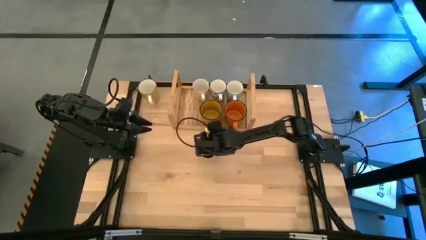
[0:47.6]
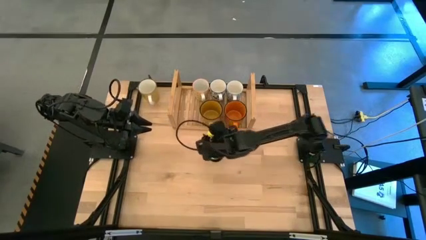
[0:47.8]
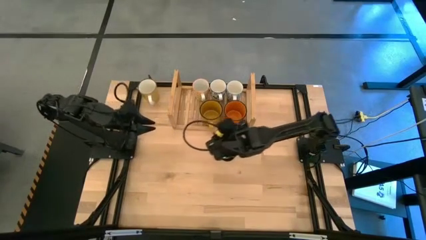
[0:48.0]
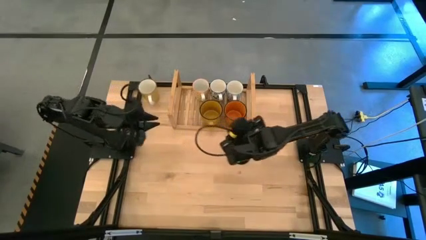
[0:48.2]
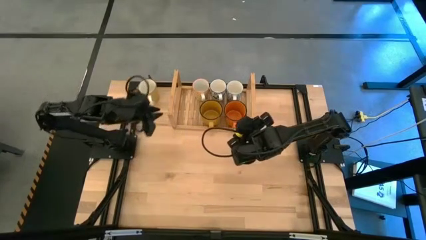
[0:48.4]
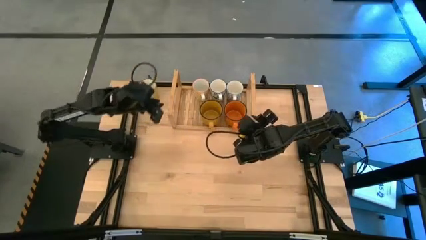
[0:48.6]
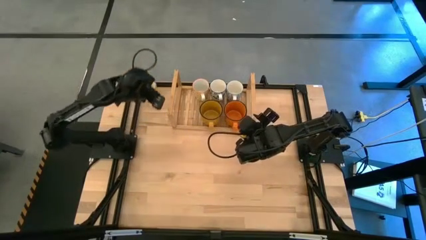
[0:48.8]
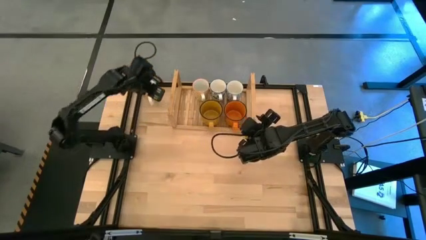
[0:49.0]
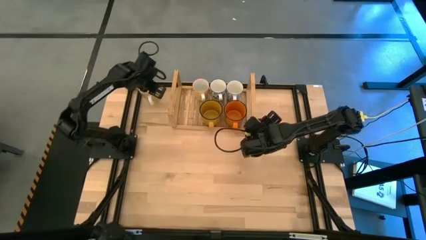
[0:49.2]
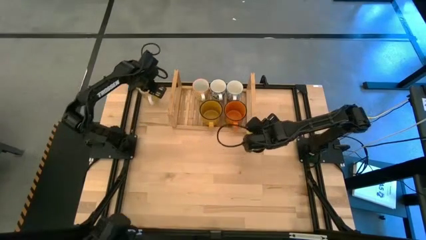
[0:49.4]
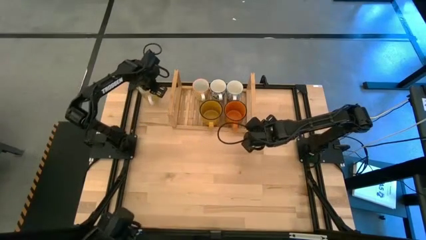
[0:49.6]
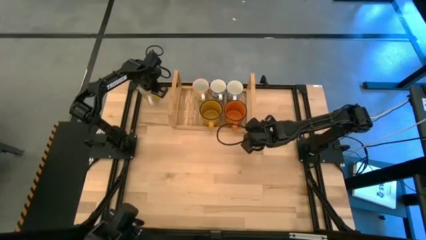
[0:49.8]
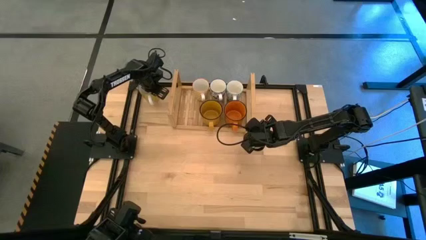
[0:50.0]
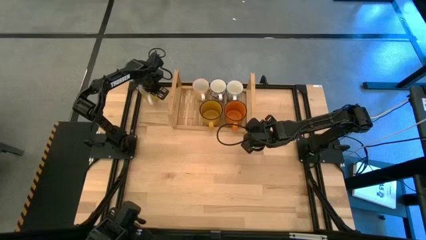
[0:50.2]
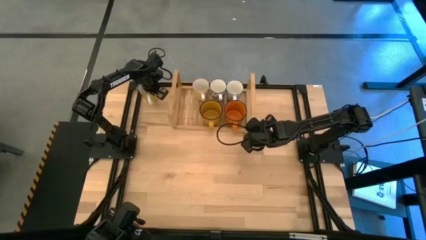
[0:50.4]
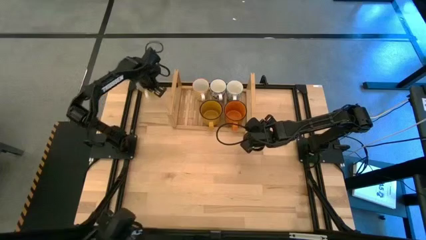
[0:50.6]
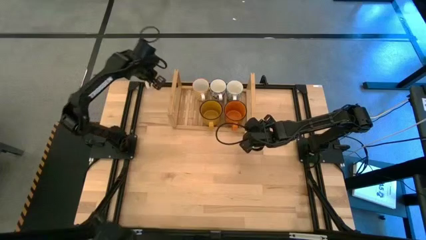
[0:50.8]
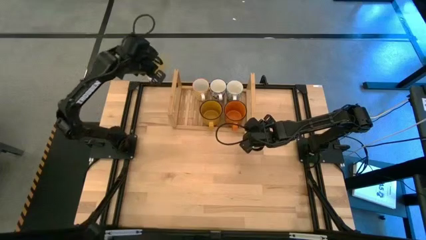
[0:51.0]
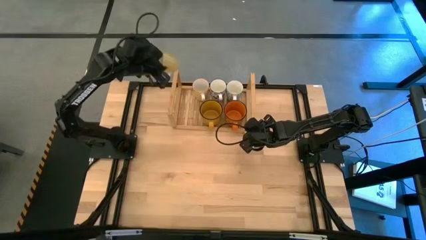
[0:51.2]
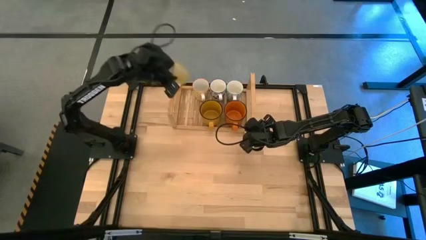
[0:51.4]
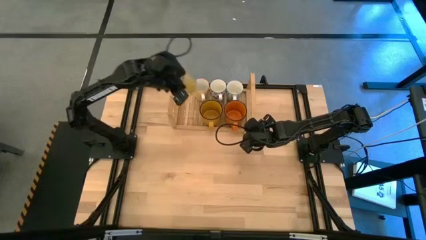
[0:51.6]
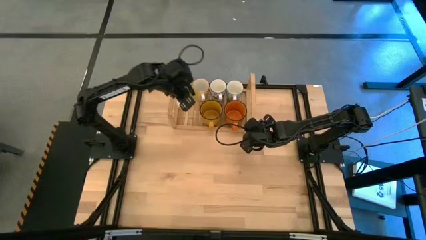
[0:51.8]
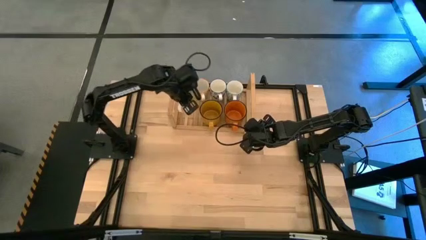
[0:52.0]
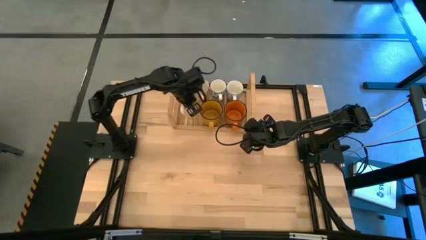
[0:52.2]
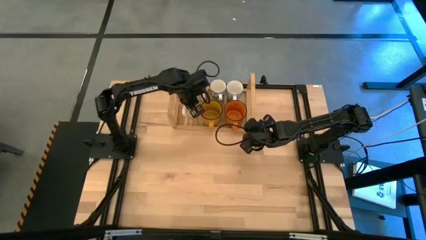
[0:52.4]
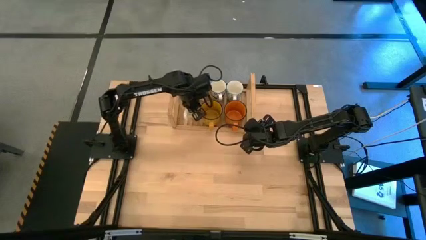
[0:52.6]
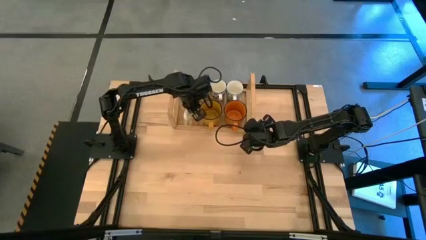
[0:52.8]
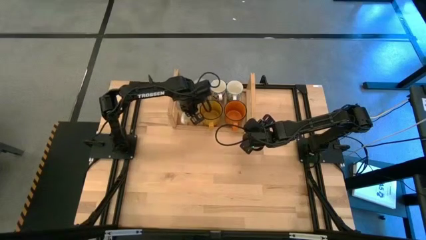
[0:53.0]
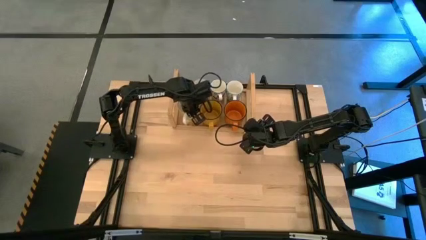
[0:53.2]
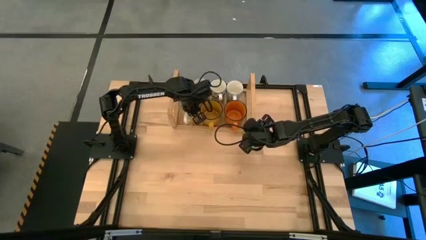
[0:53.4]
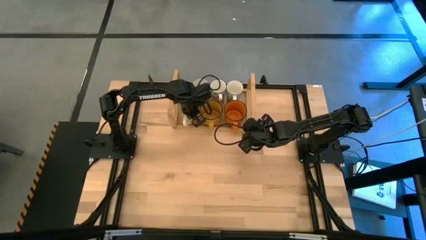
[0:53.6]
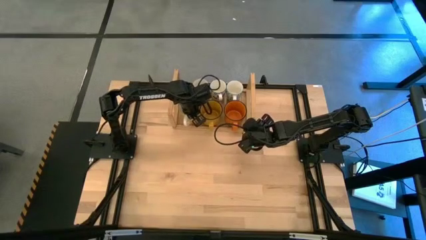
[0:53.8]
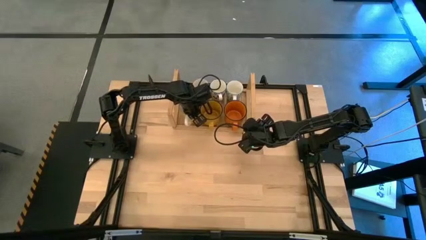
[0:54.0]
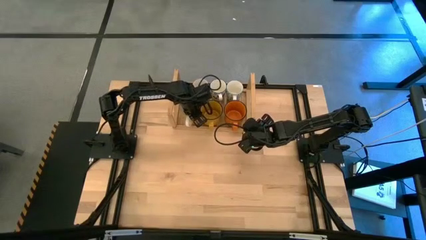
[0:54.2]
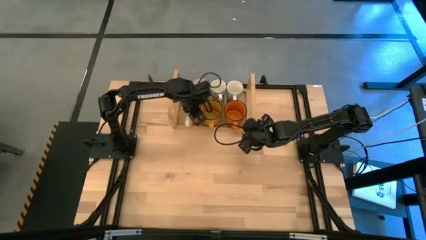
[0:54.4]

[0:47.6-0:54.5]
Task: Place coffee mugs
Put the light yellow mug on the shelf

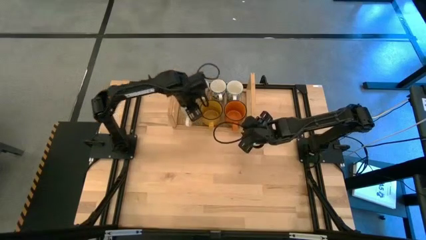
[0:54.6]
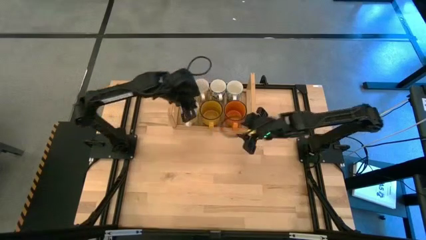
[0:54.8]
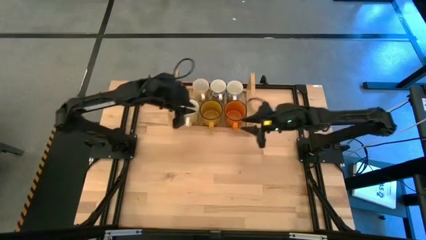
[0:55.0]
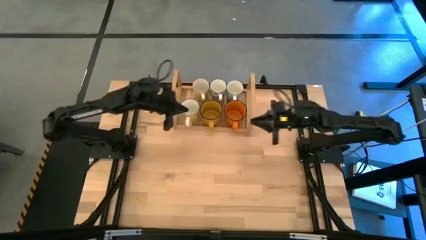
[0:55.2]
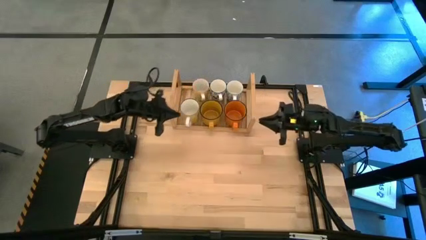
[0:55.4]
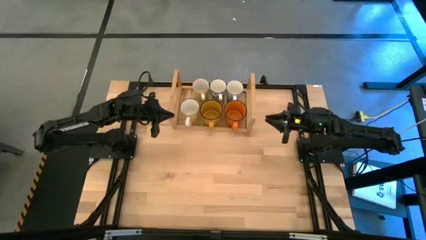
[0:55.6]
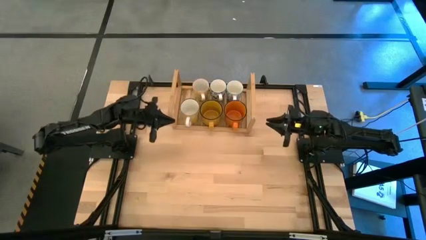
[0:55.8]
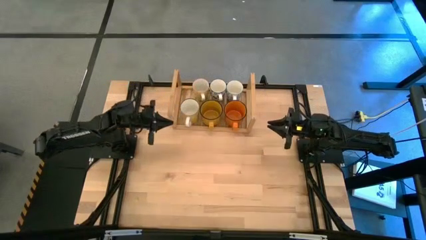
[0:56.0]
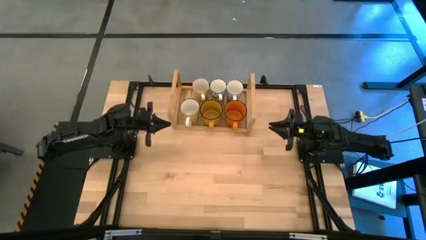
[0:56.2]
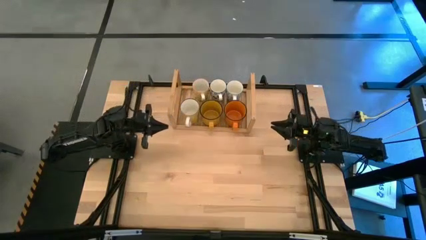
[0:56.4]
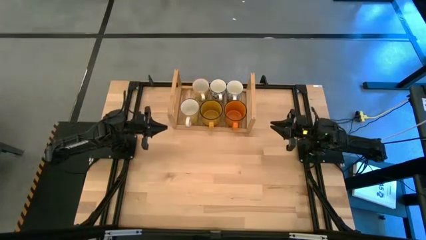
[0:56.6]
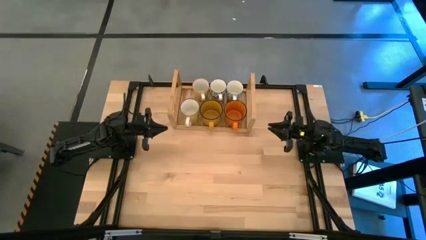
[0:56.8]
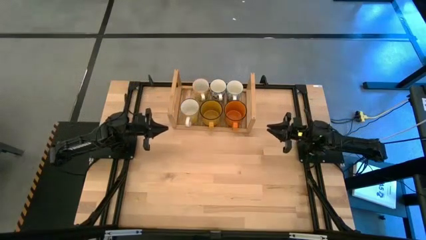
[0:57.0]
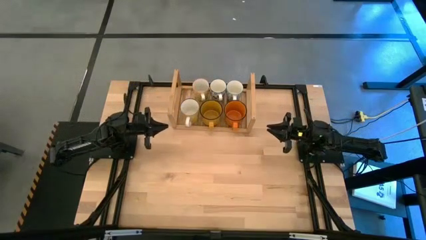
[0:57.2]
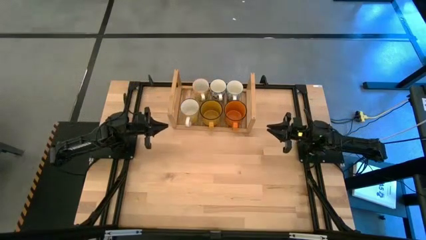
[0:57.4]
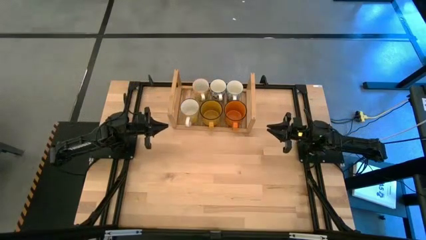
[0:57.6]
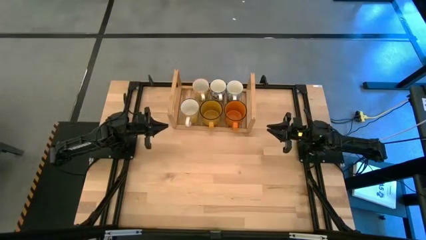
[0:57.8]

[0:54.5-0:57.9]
Return to Home Position

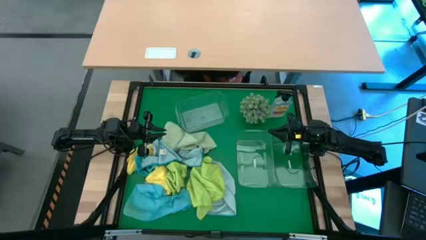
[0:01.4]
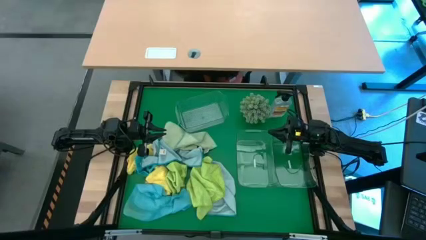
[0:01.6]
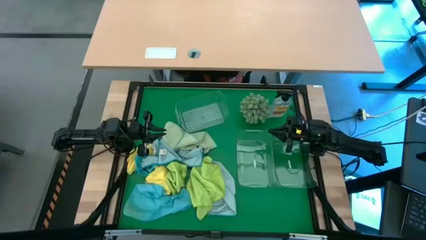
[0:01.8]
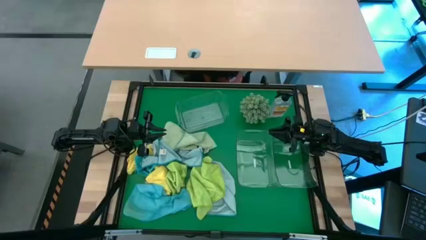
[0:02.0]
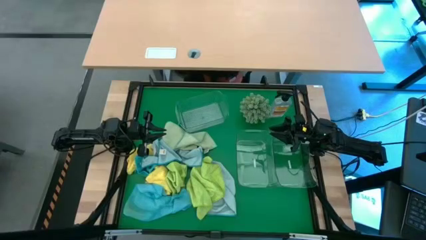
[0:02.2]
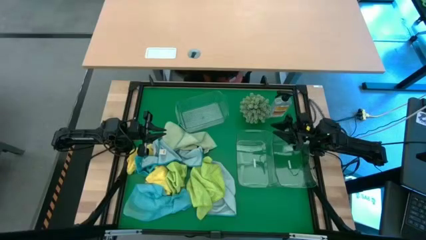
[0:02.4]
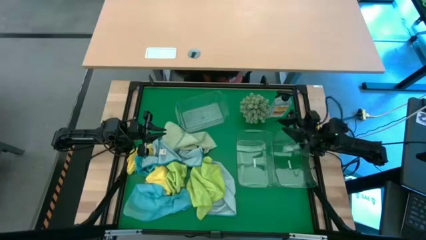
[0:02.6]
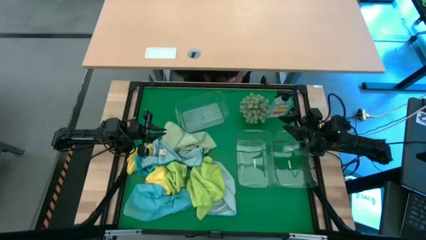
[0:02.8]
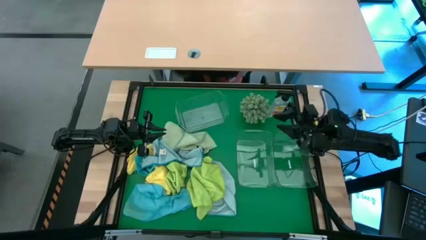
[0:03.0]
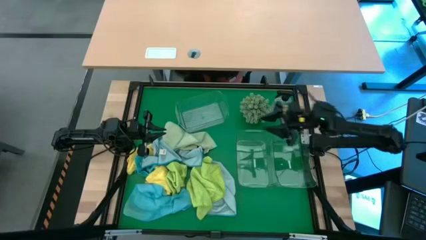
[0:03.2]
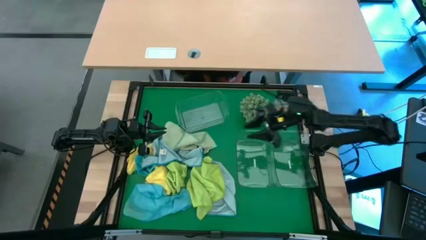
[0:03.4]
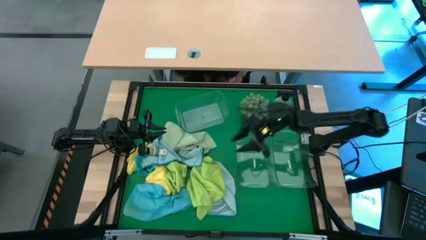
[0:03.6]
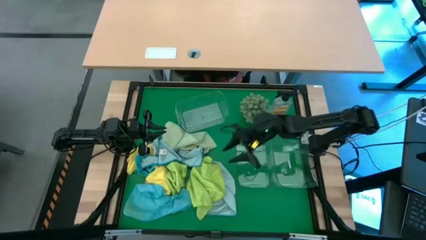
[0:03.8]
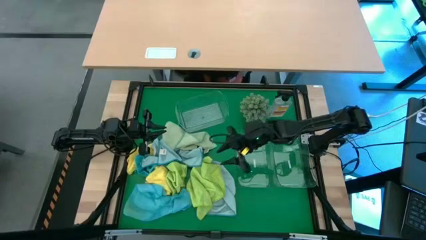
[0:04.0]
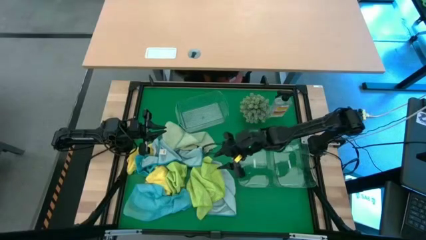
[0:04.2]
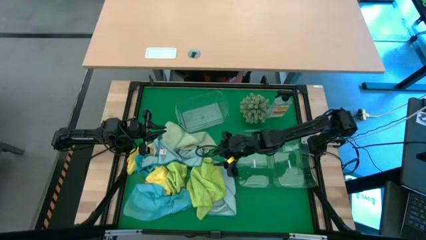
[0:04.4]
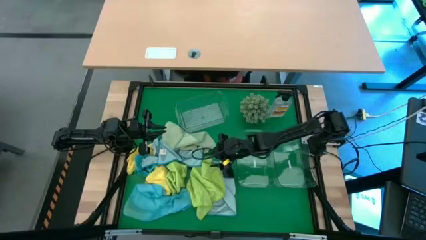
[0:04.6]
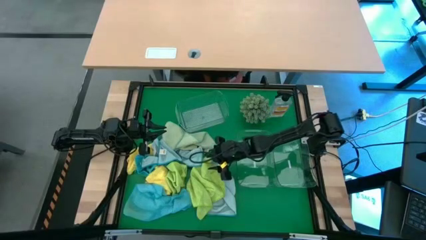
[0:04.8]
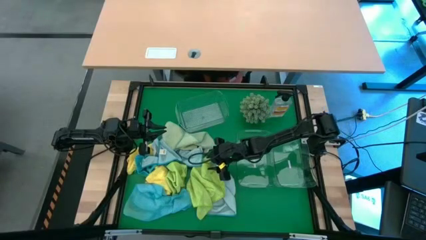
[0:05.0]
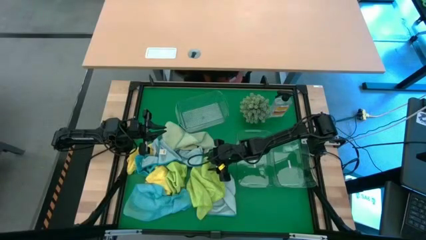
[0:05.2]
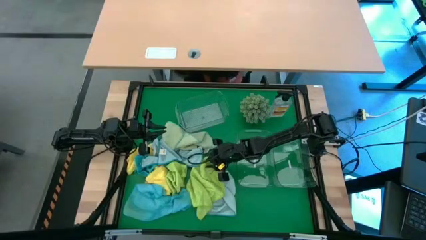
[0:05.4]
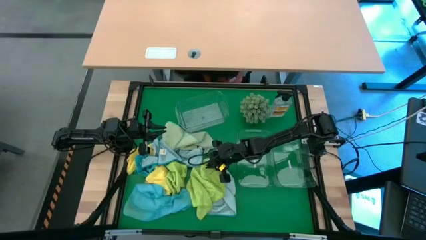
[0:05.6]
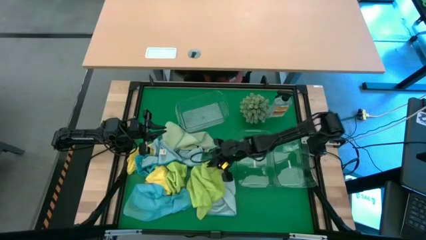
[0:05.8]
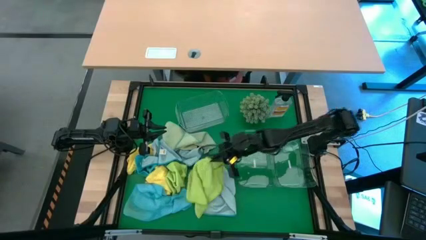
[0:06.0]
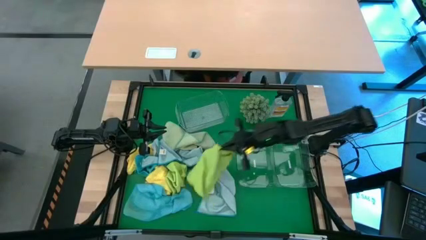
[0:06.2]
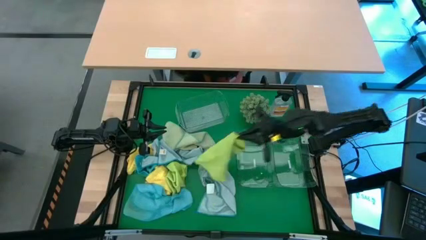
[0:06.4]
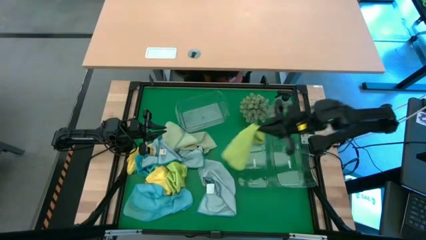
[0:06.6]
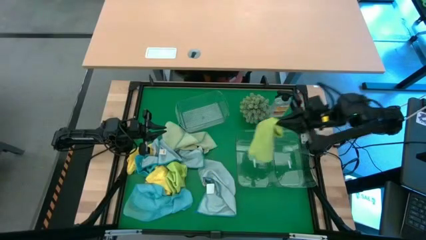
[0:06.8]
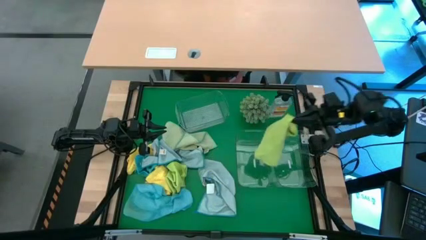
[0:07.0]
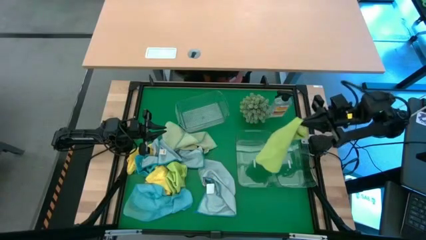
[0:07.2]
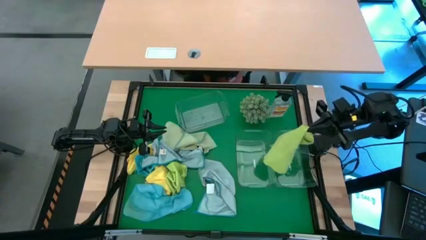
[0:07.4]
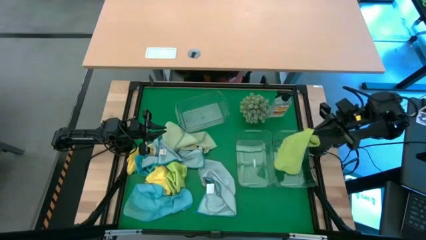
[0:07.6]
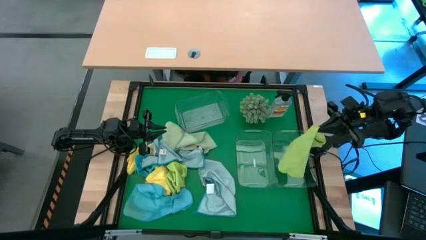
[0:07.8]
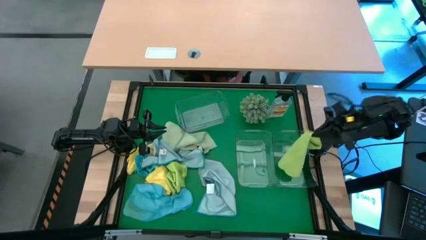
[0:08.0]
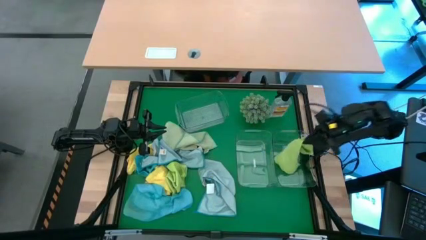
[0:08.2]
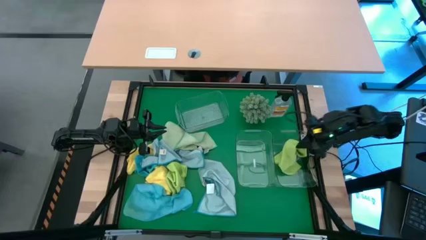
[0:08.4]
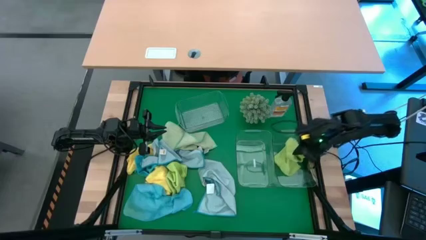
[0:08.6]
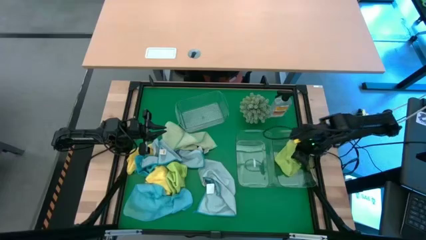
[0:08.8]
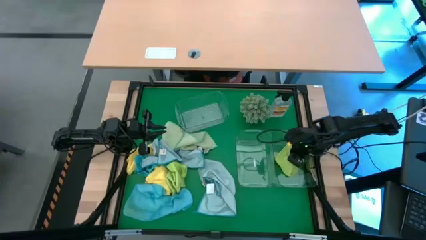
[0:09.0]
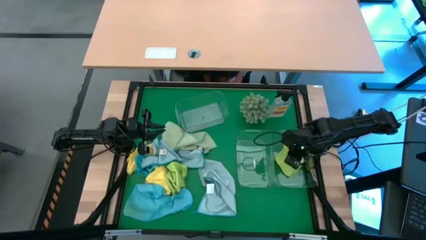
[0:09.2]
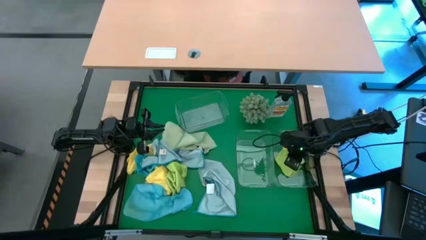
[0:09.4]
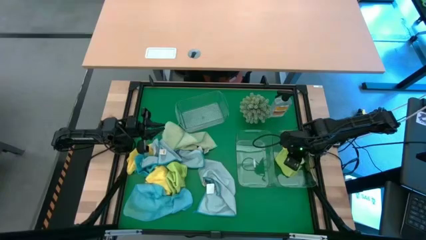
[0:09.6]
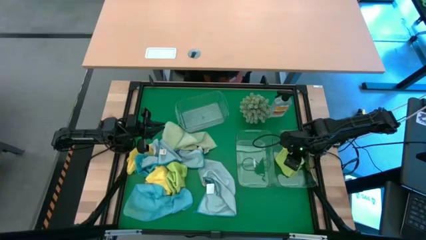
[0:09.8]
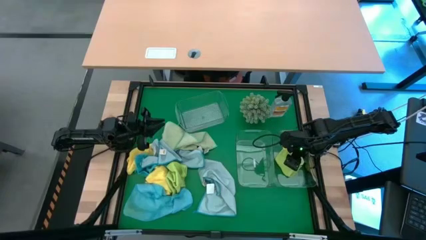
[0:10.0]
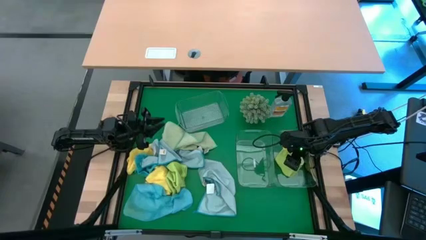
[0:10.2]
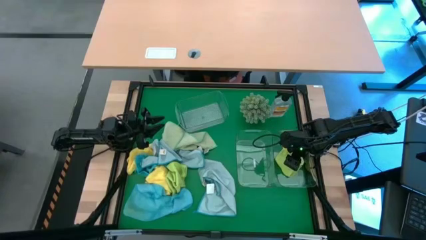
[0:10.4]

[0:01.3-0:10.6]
Task: Sort microfiber towel by color & place in baskets
Put the bottom right green towel into the bottom right transparent bin
